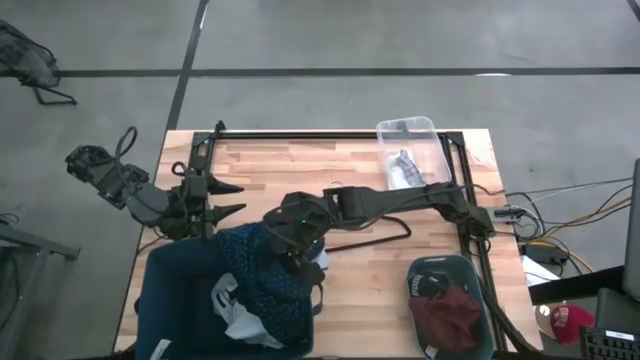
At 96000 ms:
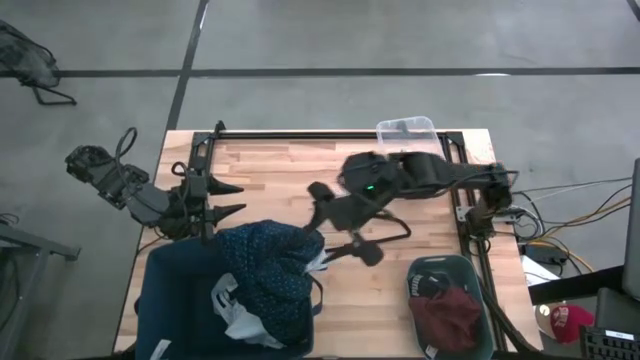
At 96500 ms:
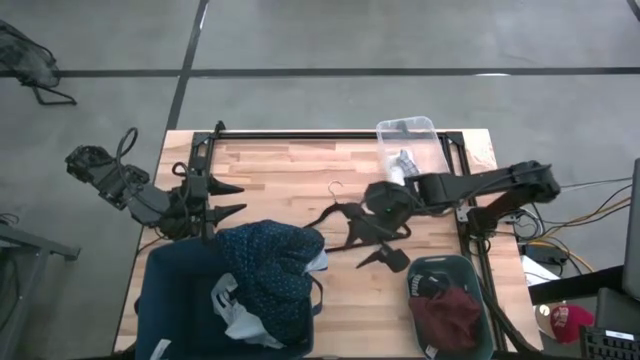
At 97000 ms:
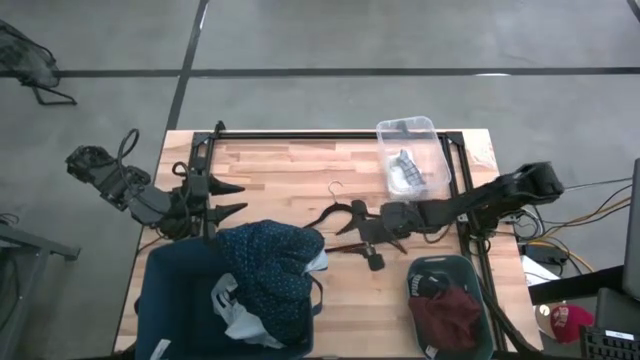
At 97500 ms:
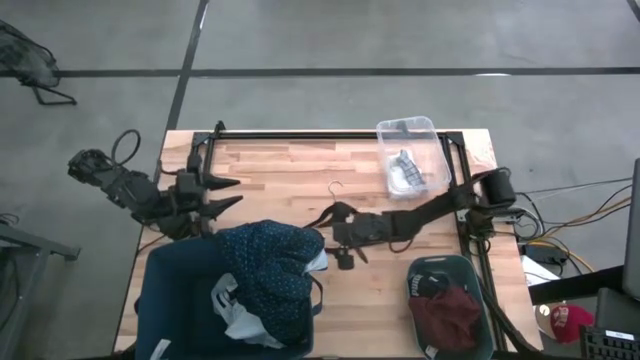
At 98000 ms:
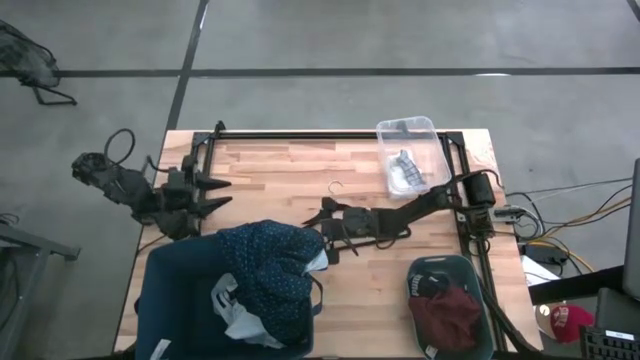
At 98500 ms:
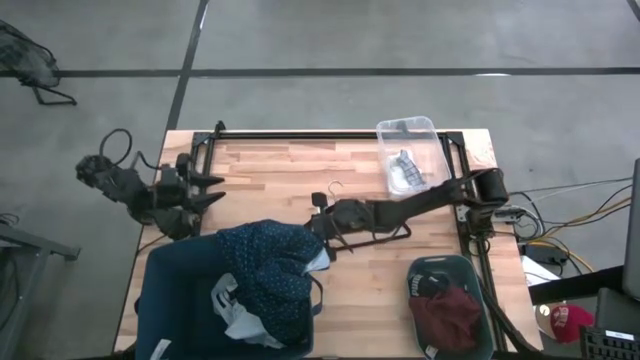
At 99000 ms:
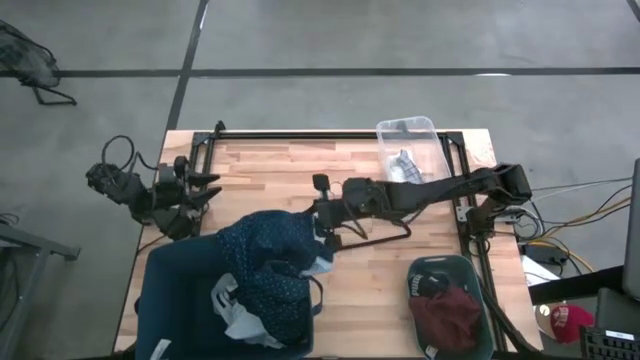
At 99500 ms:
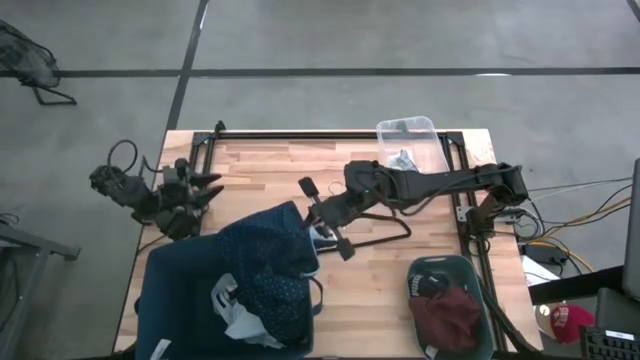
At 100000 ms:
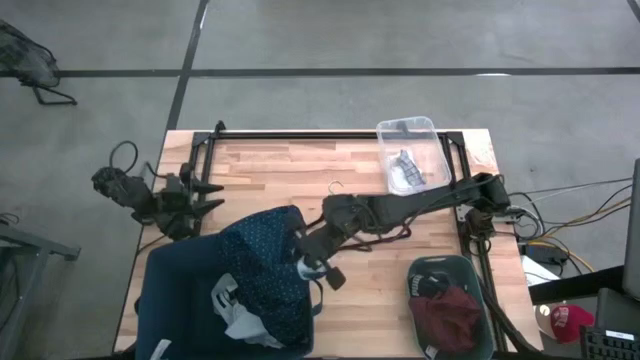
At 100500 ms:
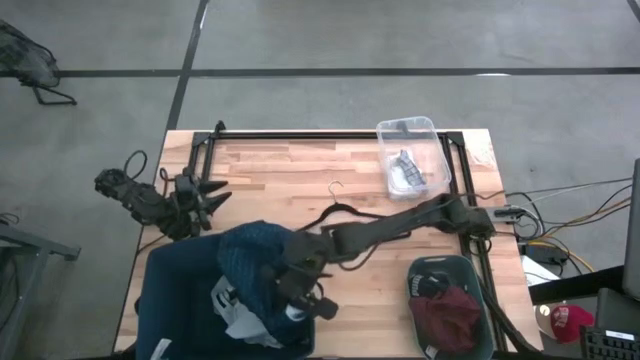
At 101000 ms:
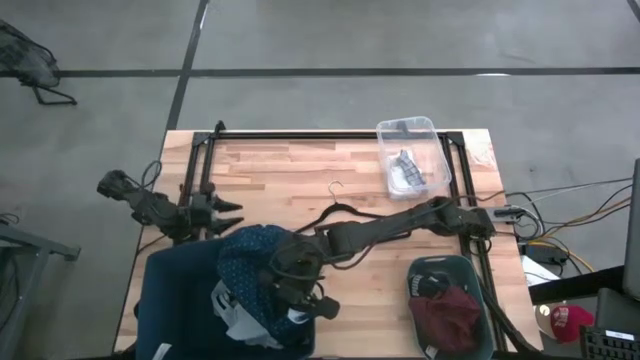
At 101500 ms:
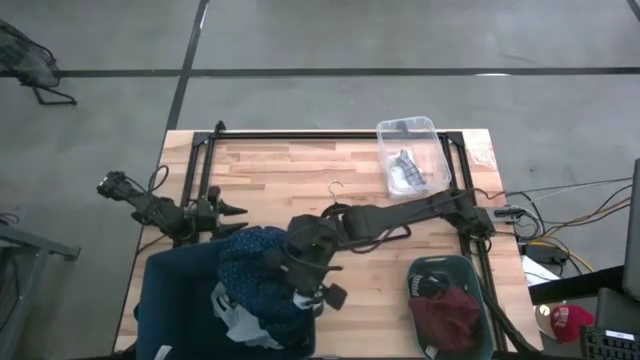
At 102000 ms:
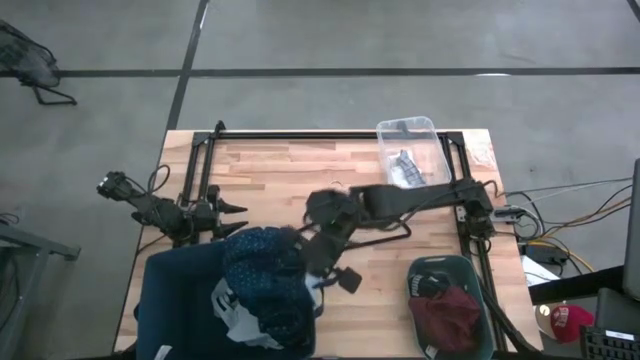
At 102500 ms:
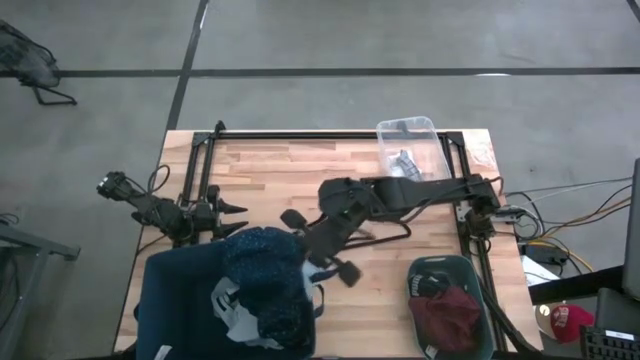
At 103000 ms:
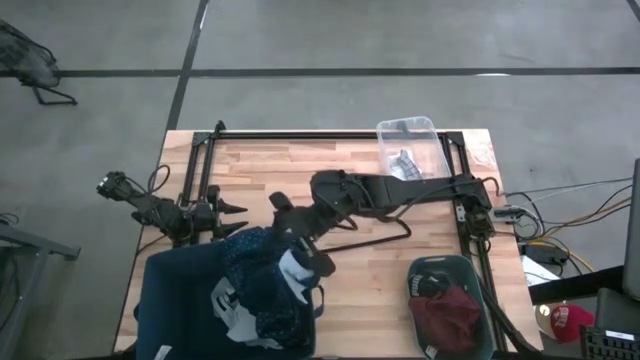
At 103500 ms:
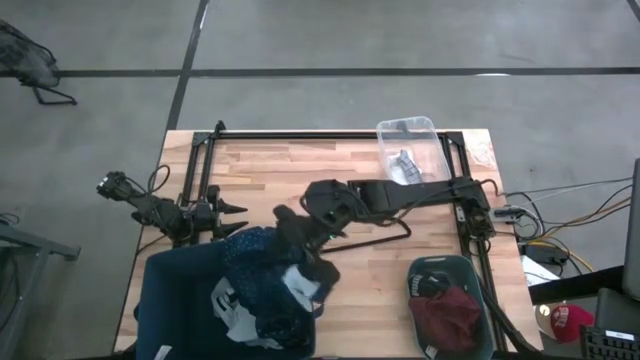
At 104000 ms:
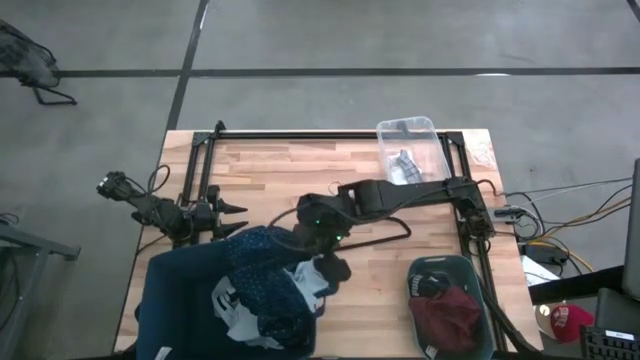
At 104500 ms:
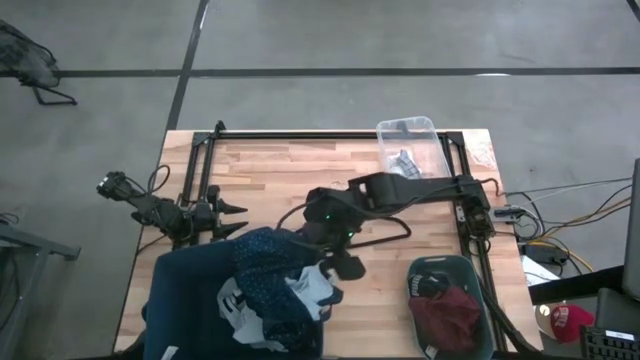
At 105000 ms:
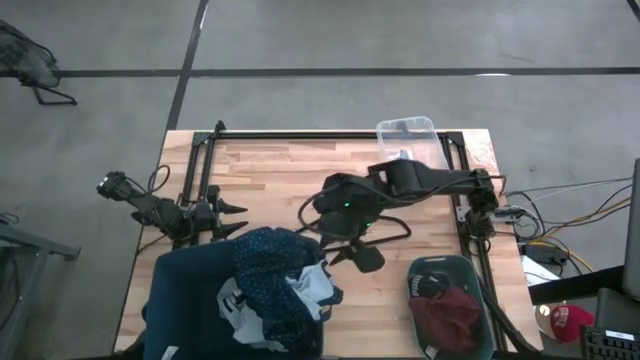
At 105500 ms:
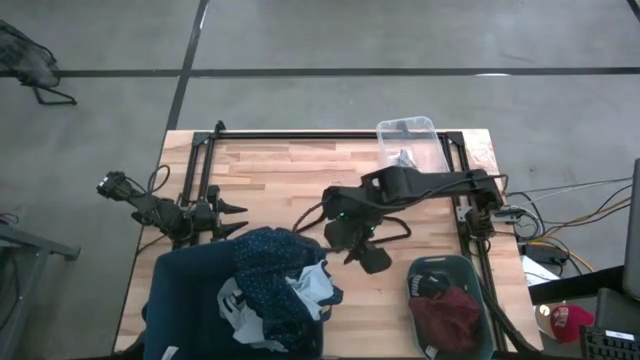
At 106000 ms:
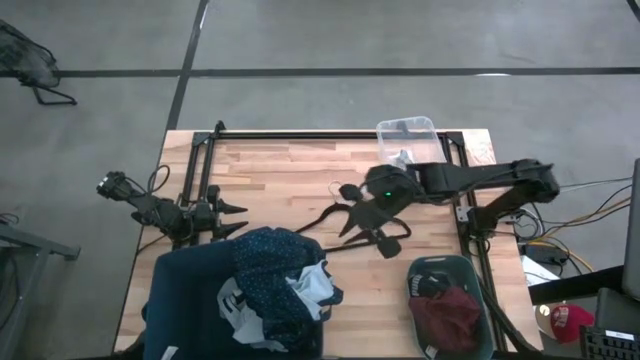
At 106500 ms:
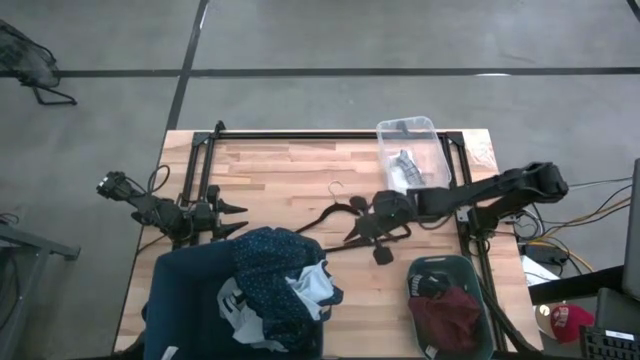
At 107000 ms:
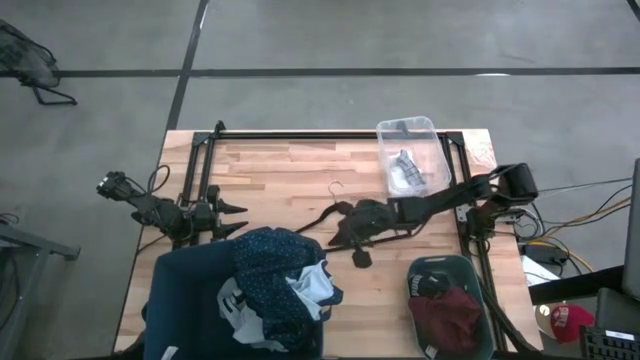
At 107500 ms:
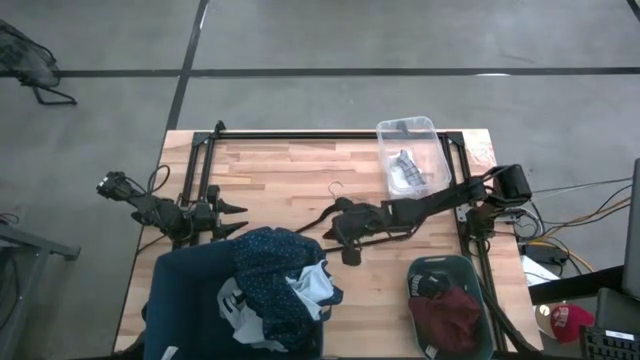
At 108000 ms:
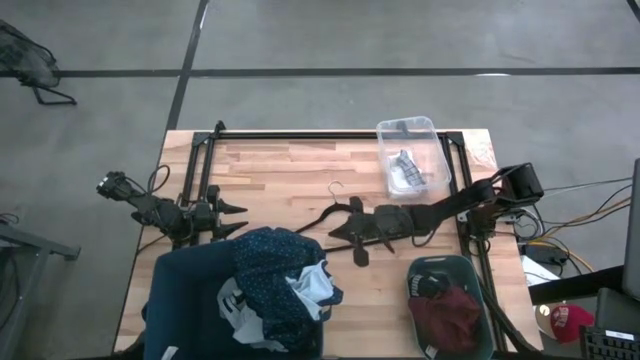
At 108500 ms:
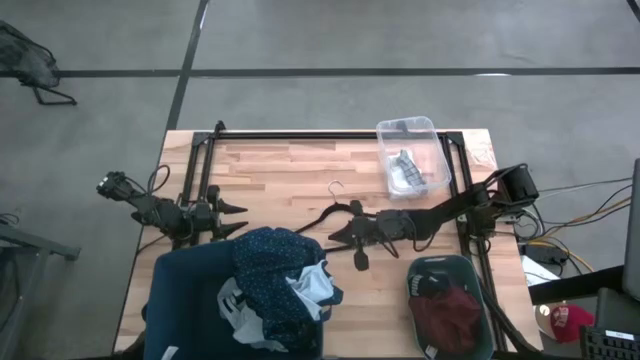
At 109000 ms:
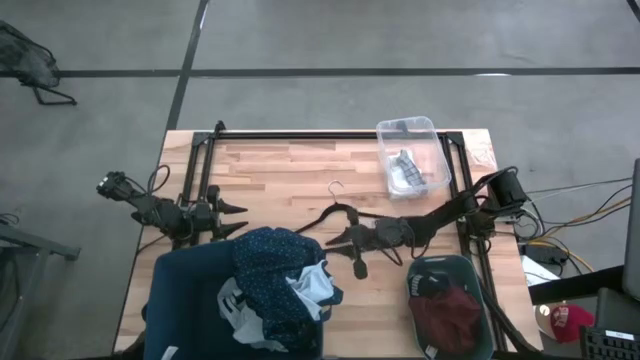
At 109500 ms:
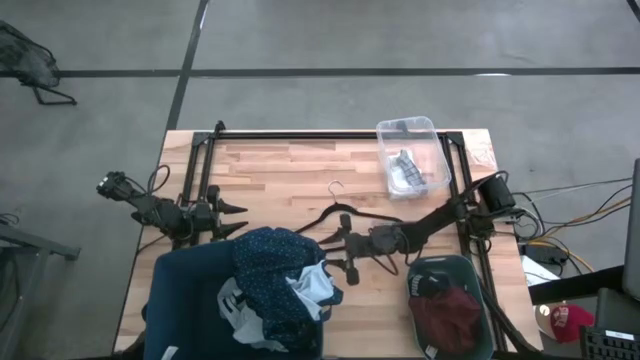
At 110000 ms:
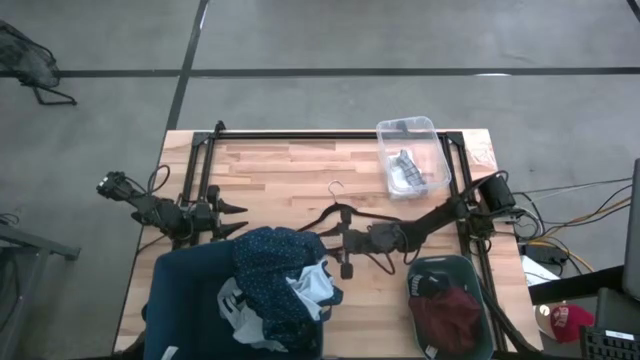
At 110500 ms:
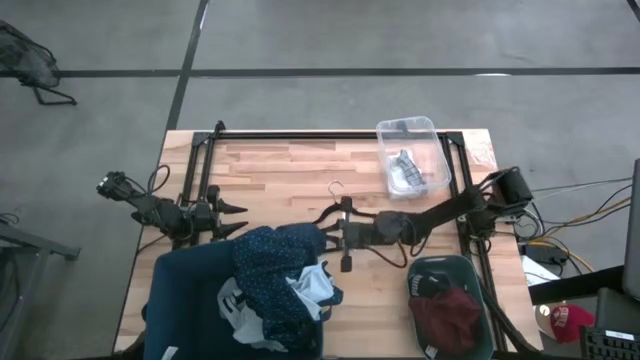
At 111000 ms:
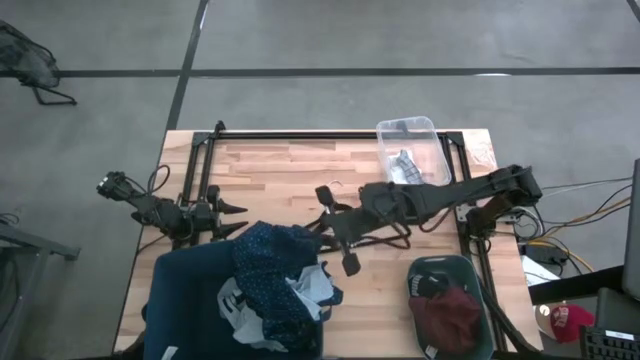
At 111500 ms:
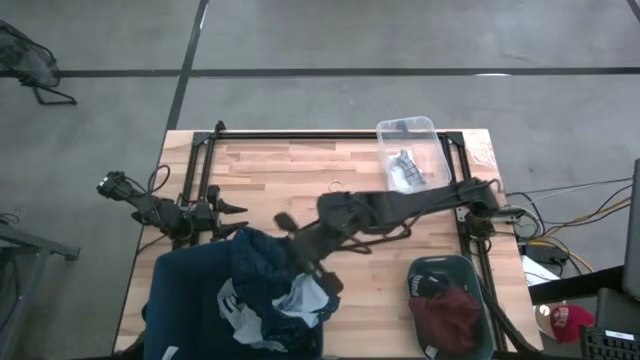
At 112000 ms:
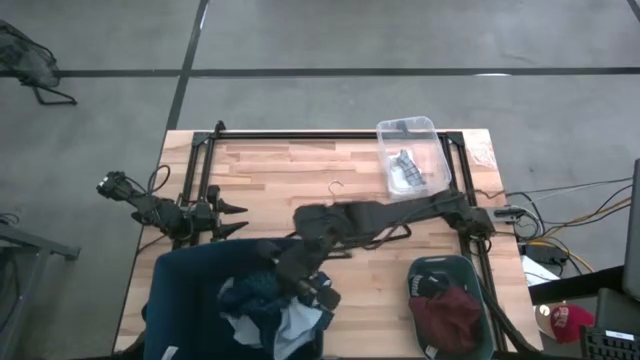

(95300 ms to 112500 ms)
Task: Pick & Place Cloths
Put the blue shirt into the blue laundry bin

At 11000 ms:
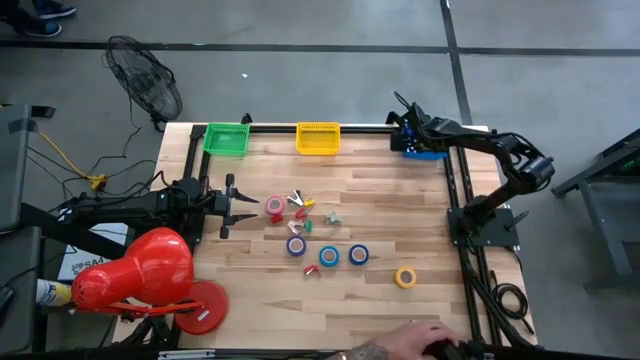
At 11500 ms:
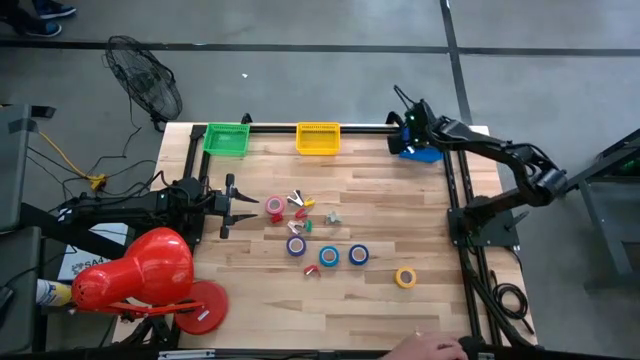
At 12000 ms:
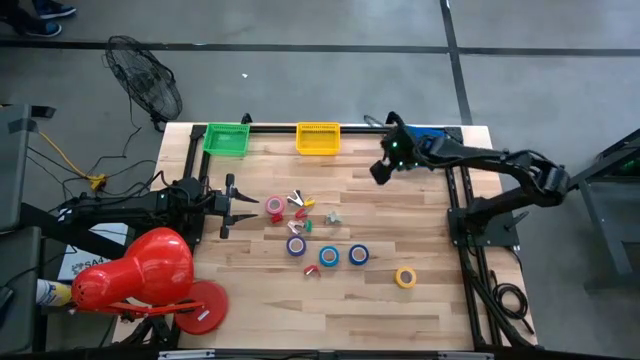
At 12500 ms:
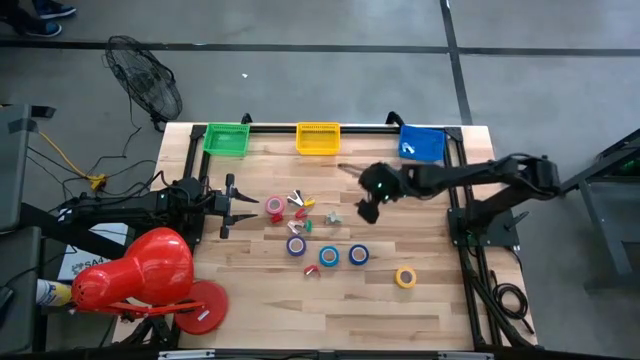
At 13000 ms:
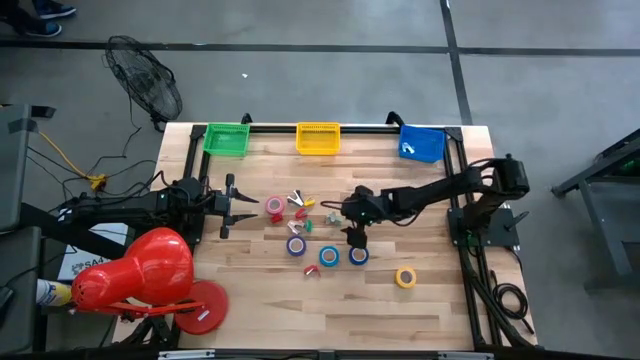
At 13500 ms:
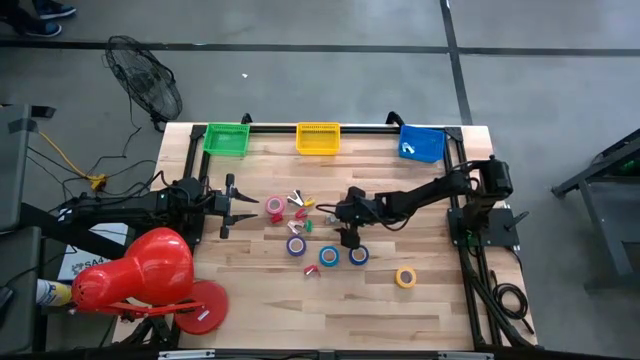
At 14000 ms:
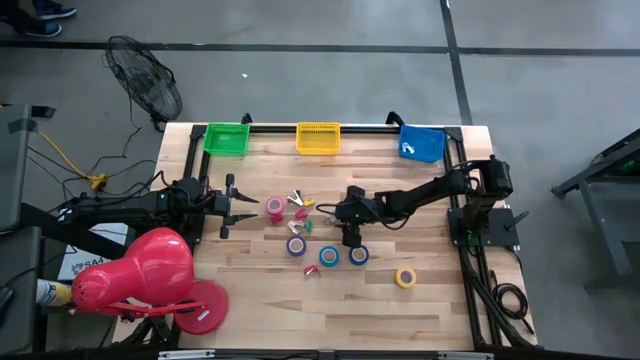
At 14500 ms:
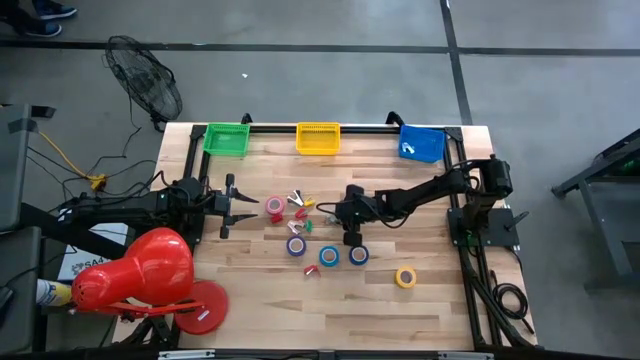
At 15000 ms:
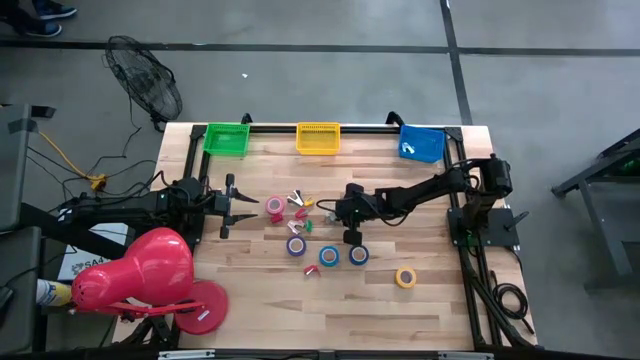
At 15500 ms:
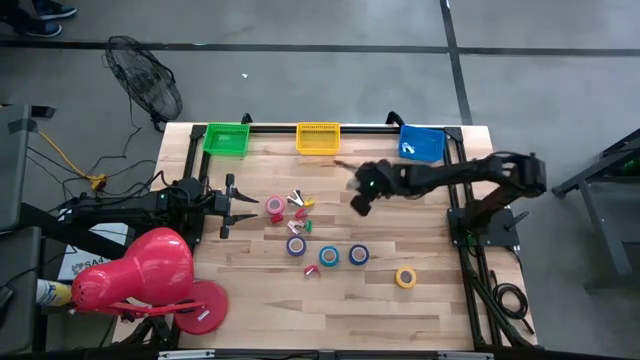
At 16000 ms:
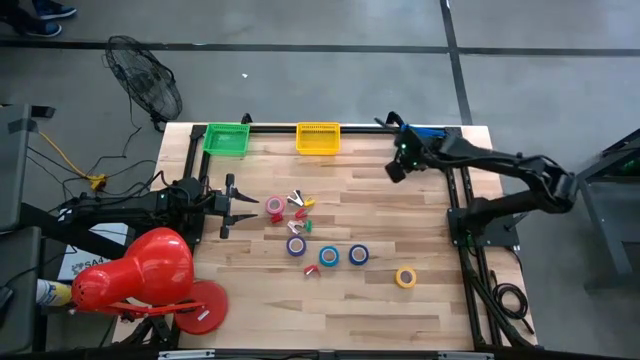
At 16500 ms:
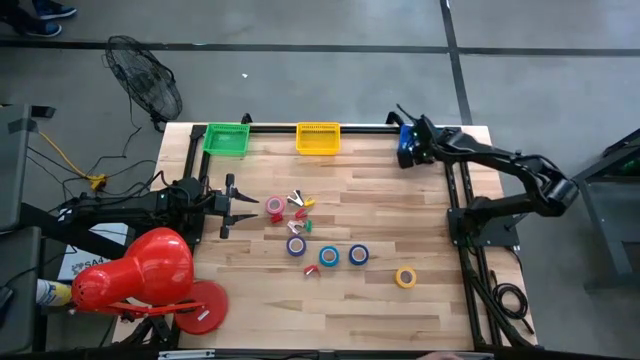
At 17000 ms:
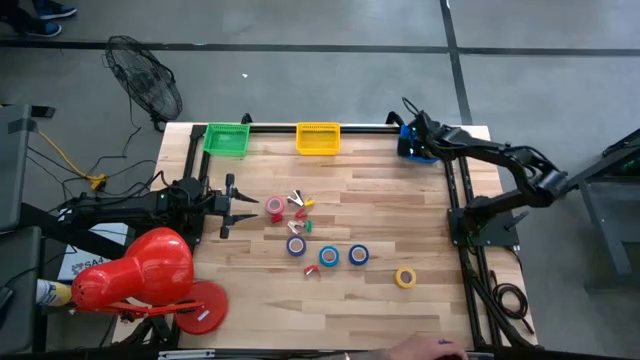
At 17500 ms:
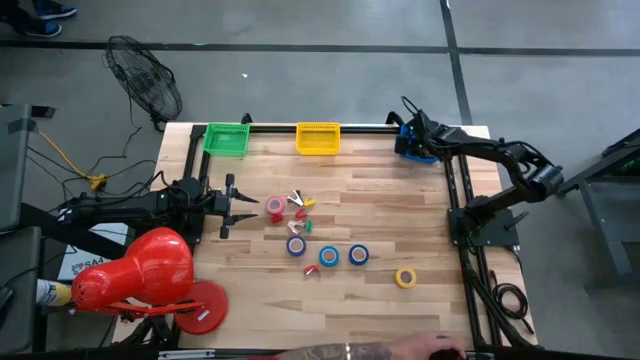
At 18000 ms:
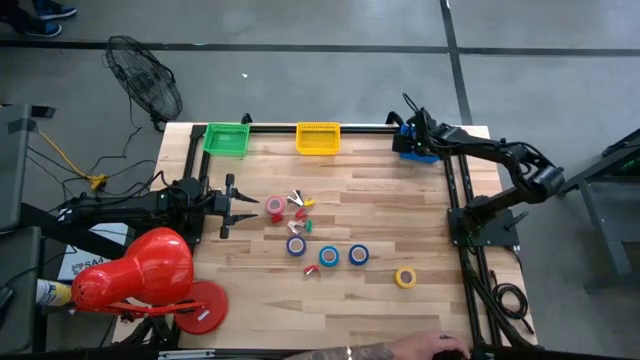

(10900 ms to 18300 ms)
Task: Pick and place Stapler, Stapler remover, tape
Put the gray staple remover into the blue bin
